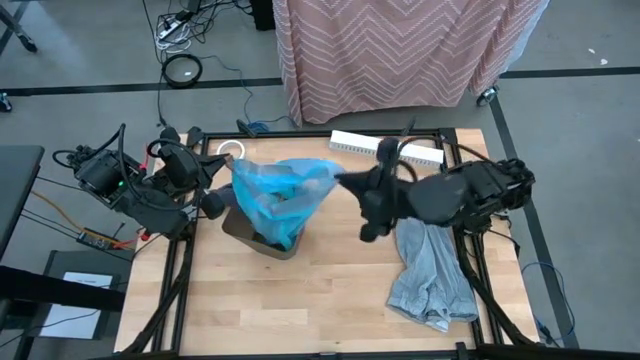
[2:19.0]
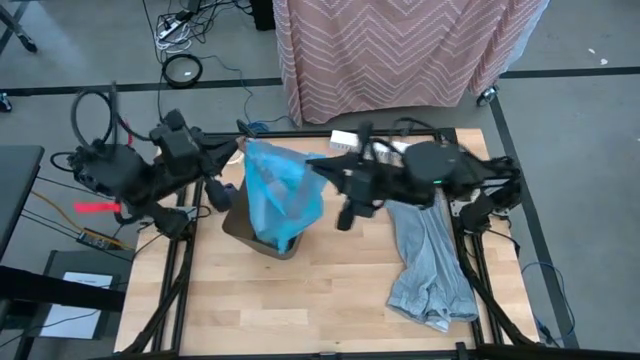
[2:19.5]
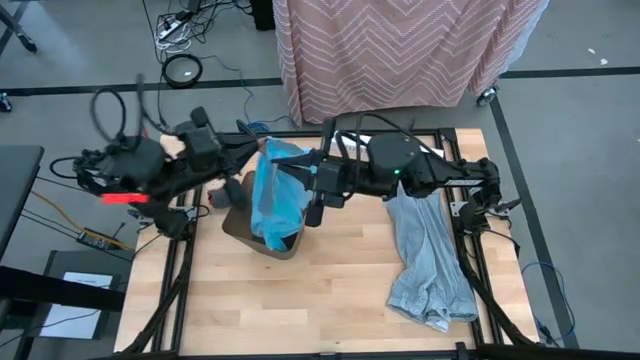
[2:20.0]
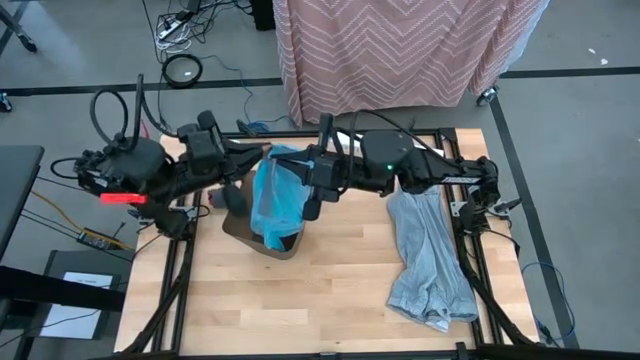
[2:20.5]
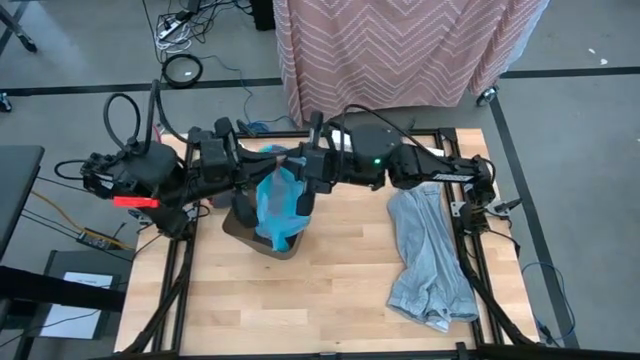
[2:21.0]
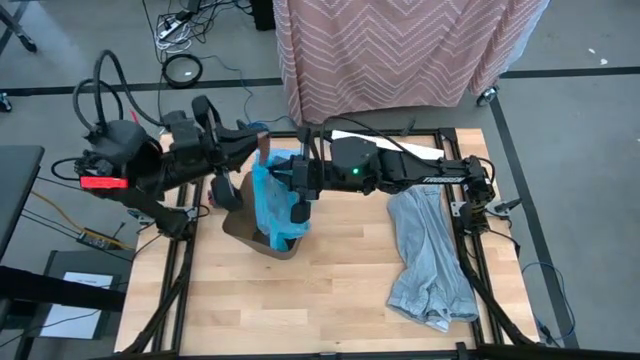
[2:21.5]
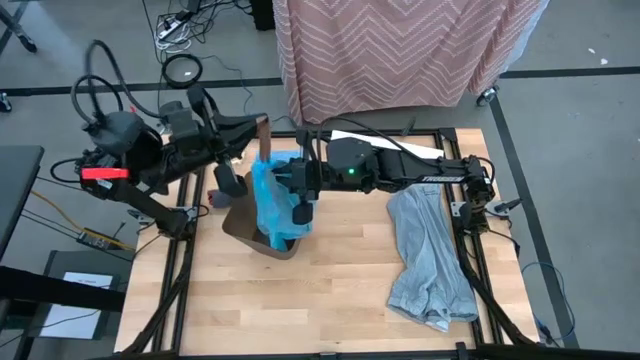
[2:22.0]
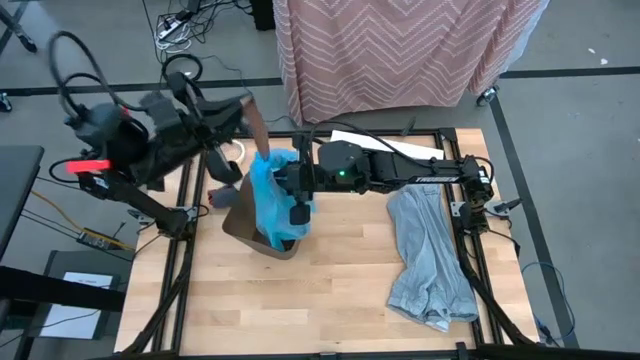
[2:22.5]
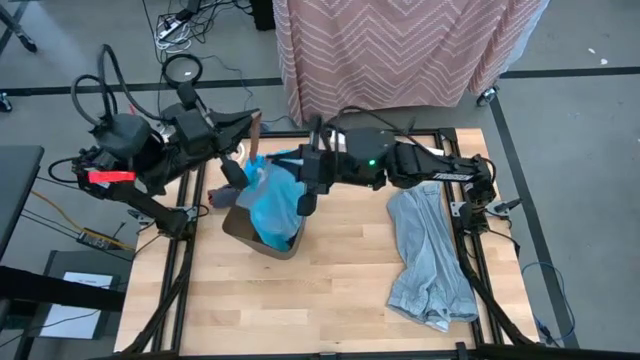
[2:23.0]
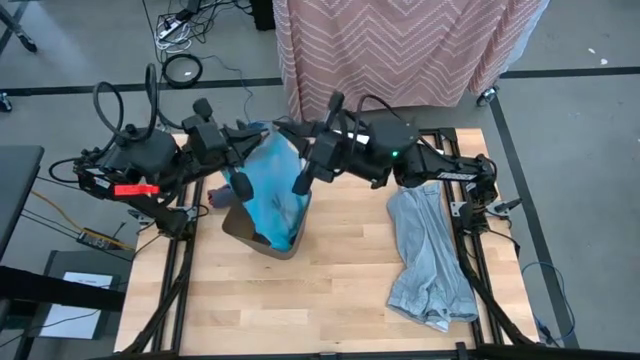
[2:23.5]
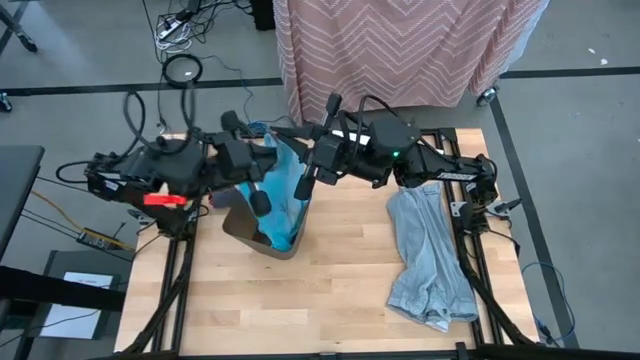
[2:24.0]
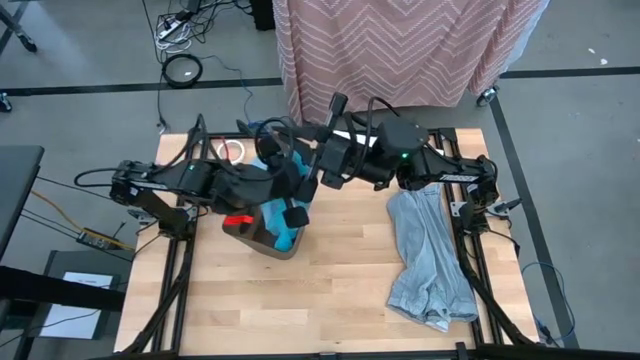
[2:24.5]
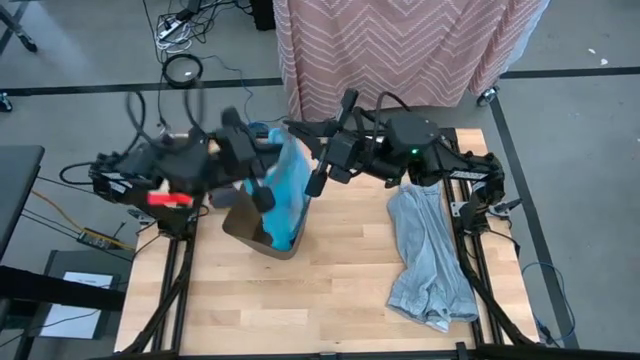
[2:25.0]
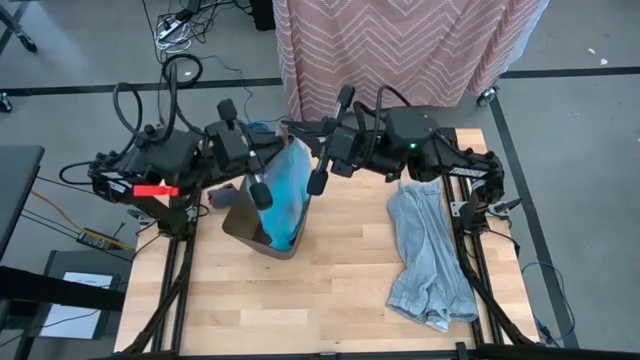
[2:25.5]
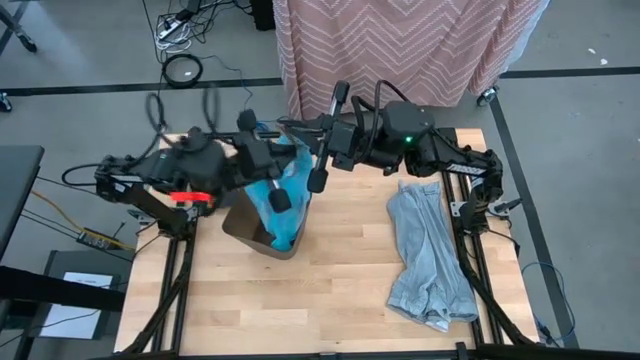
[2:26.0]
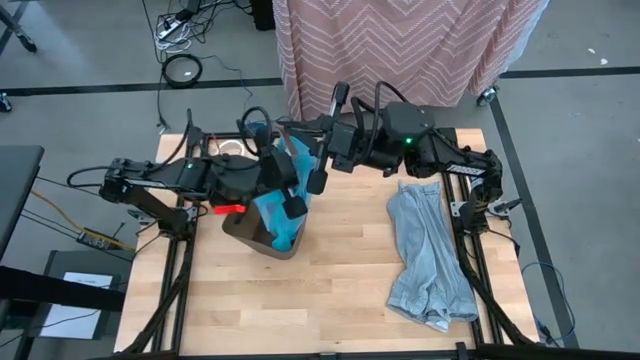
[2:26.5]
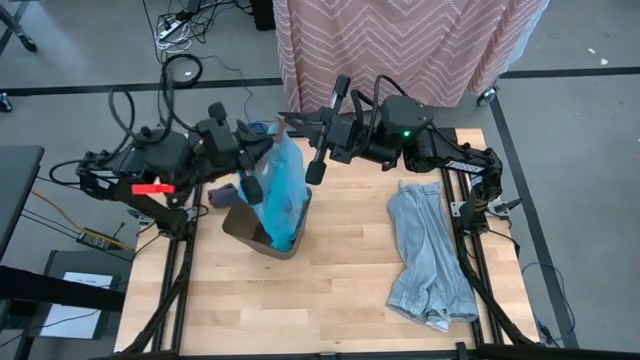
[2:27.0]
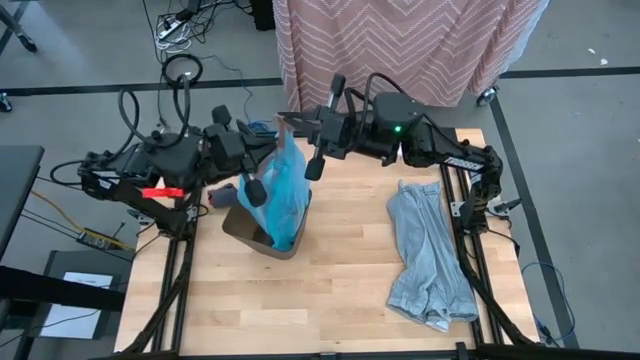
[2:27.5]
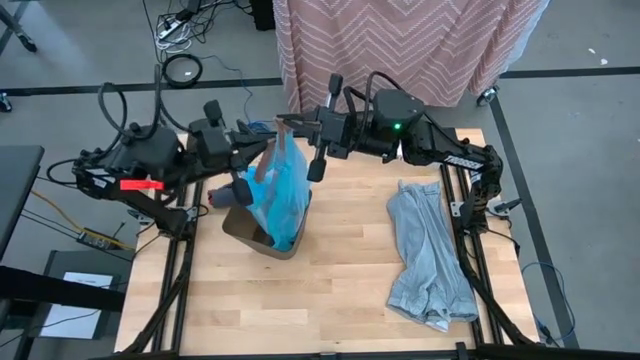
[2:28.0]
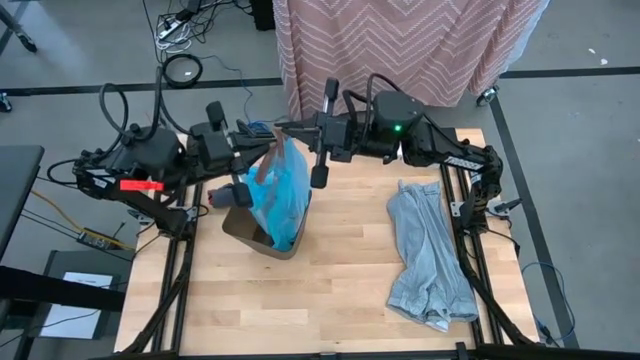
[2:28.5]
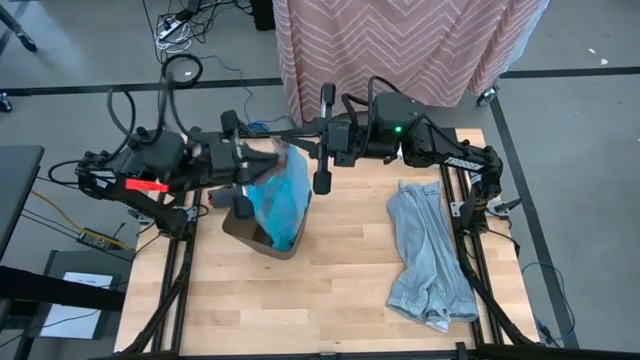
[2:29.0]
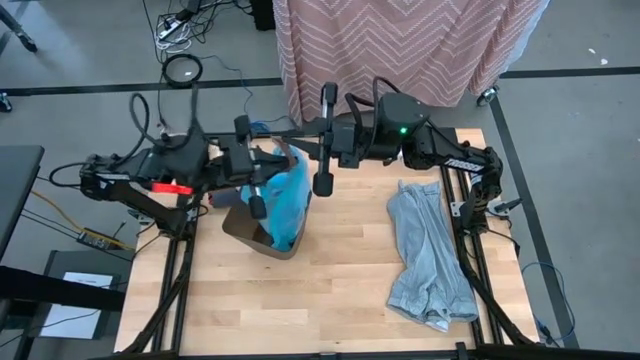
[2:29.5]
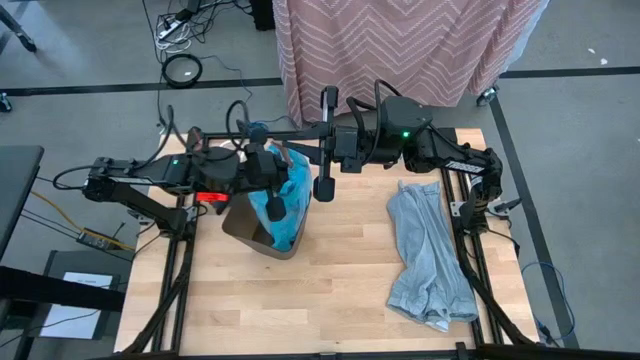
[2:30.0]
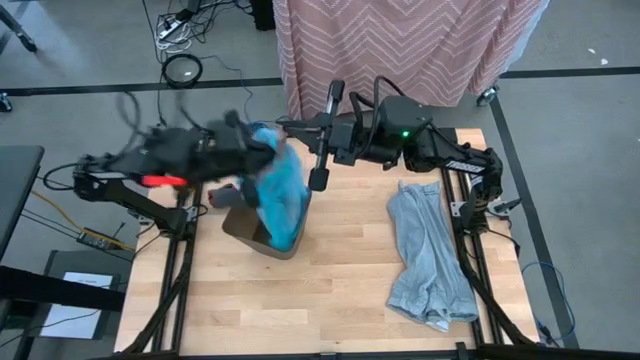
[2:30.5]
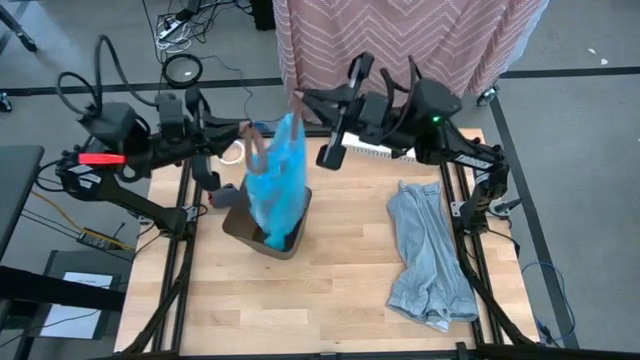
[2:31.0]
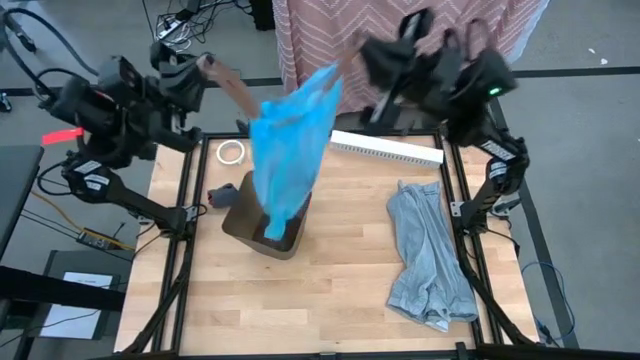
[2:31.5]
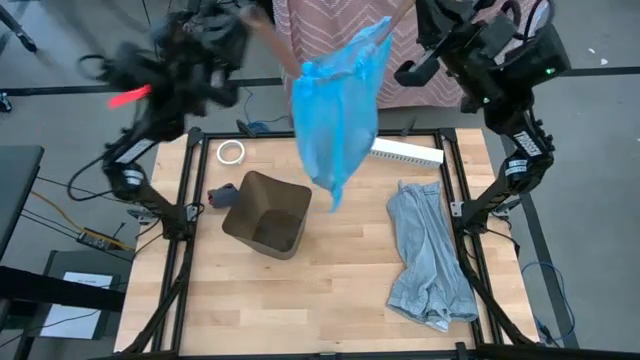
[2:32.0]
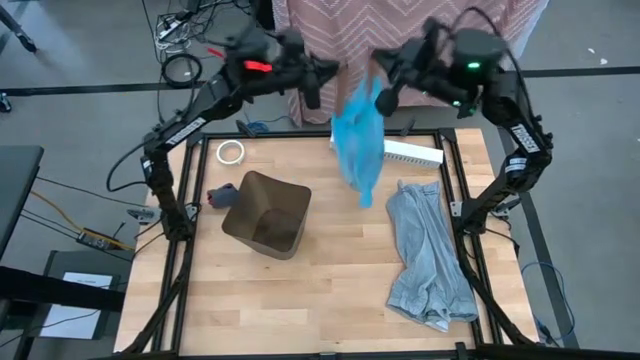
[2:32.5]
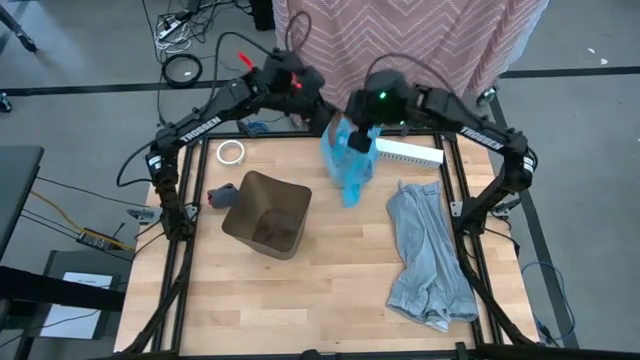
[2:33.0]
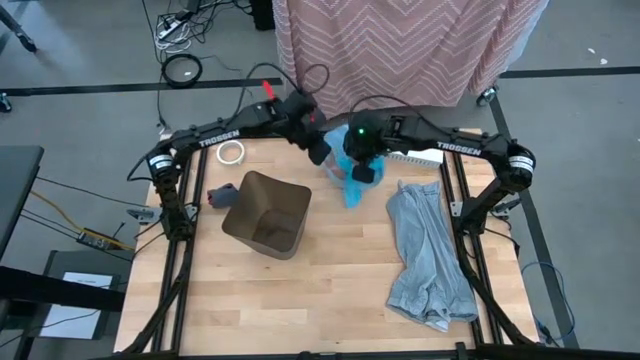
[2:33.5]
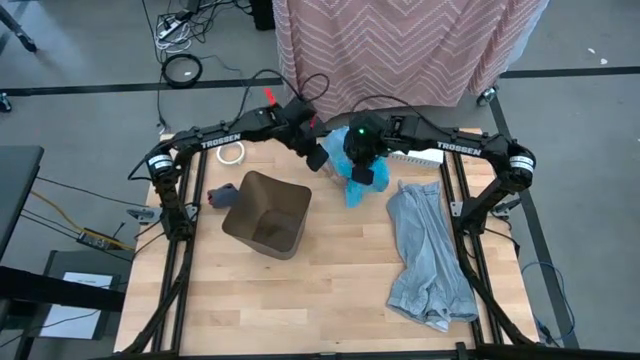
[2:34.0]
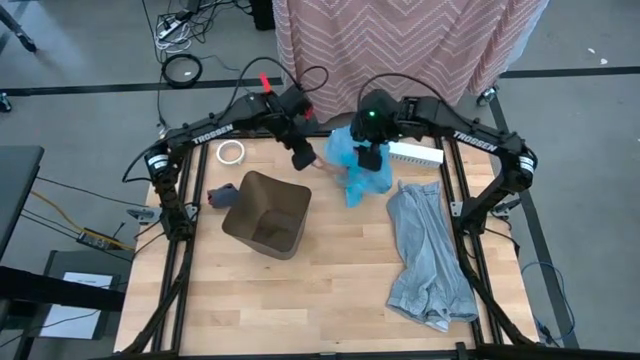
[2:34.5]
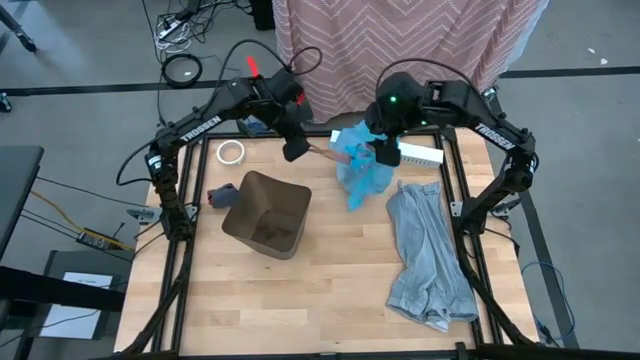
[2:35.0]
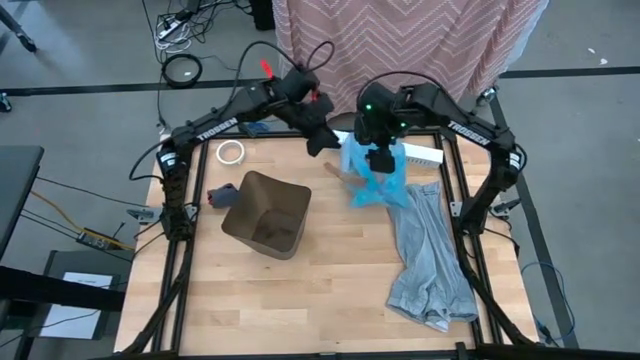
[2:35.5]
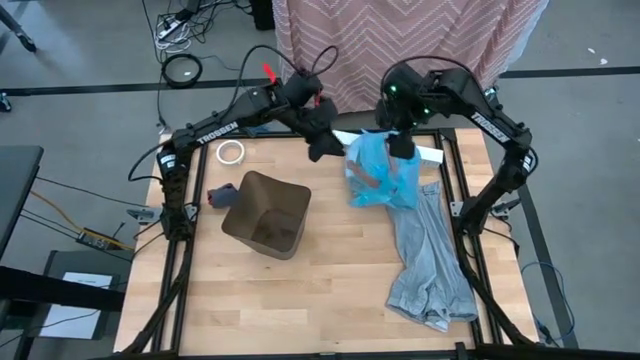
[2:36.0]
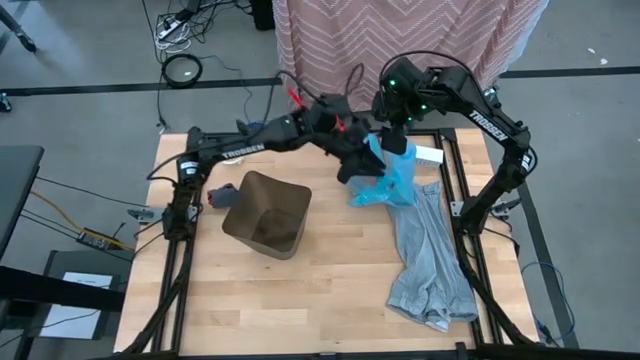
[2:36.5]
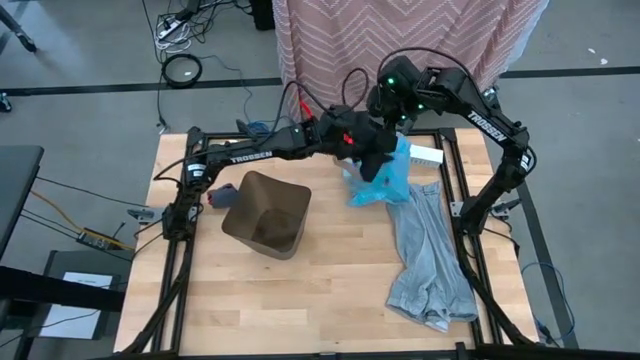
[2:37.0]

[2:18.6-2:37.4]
Task: place trash/remove bag and relplace
Remove the blue trash bag from the black trash bin

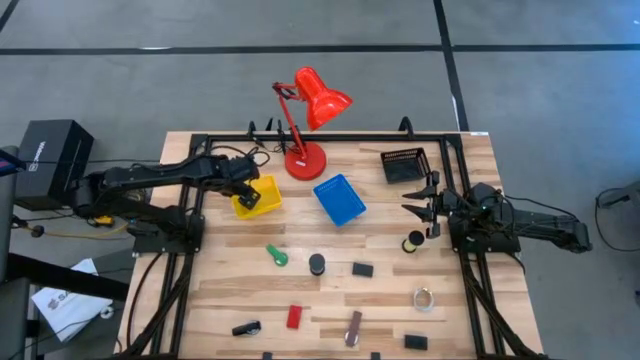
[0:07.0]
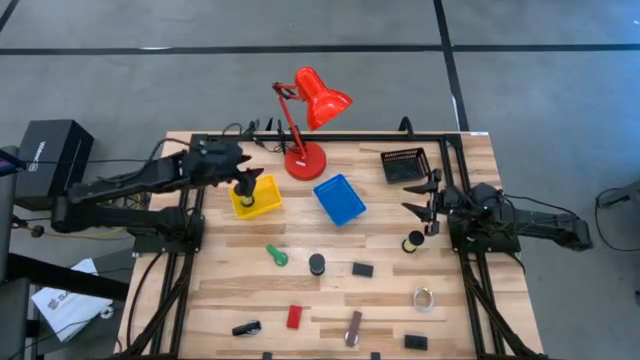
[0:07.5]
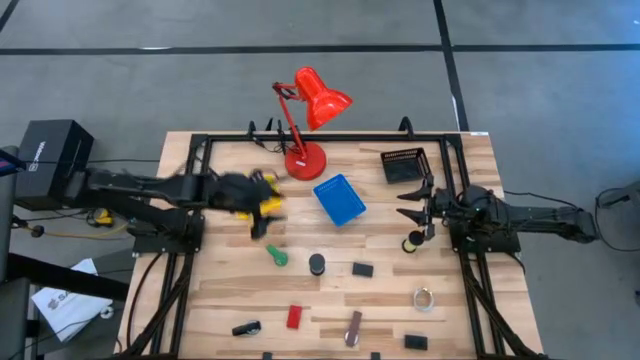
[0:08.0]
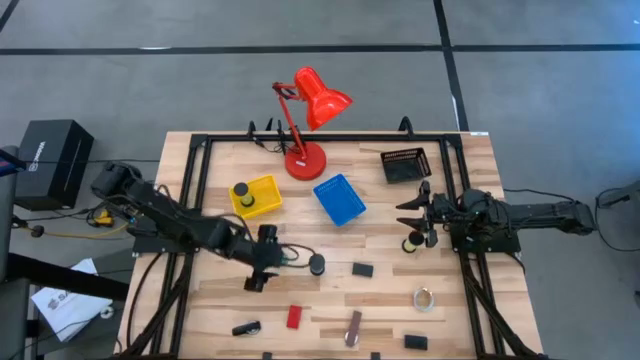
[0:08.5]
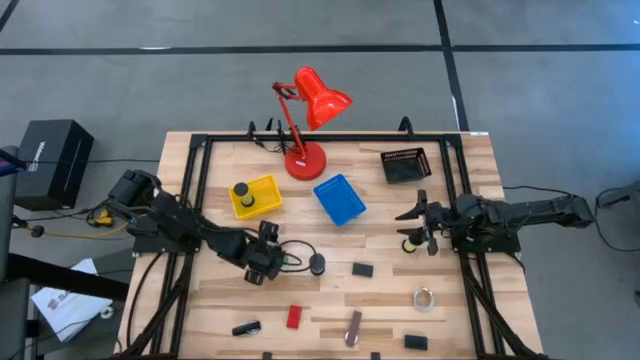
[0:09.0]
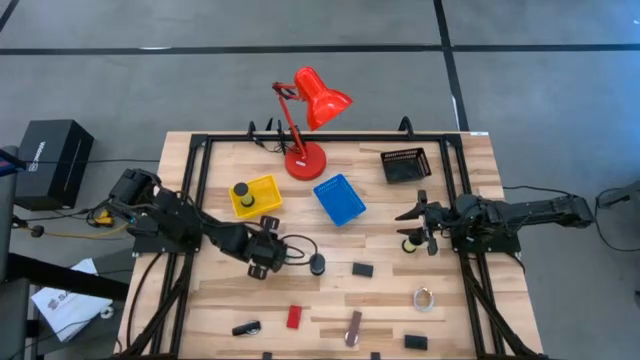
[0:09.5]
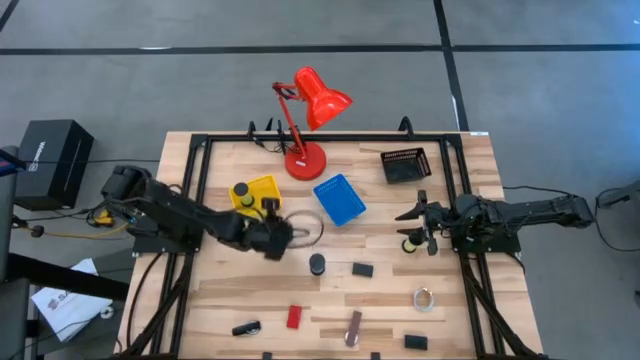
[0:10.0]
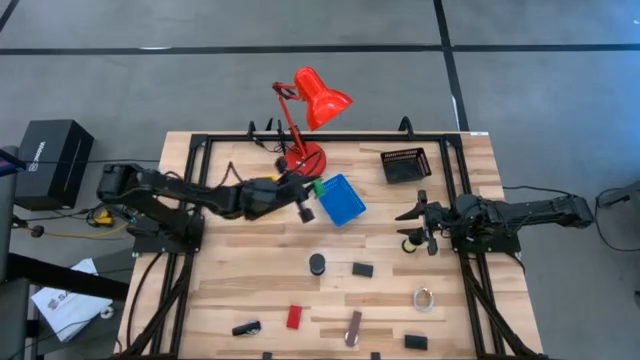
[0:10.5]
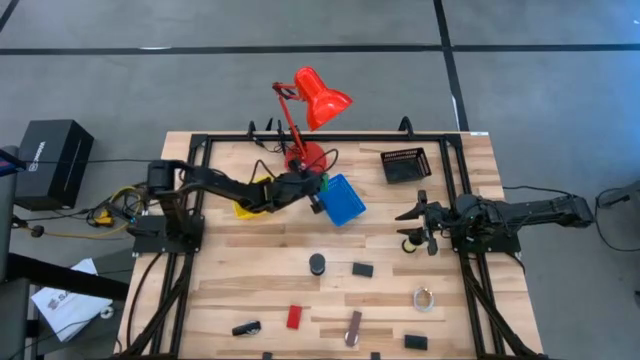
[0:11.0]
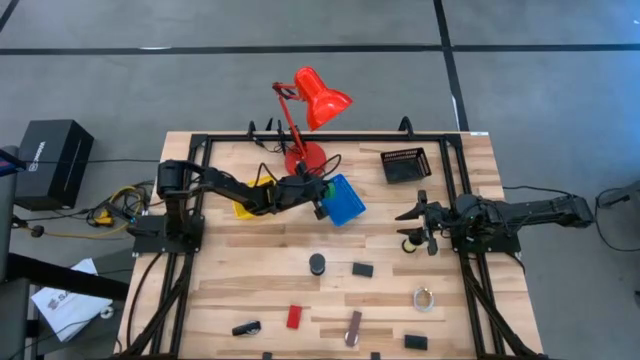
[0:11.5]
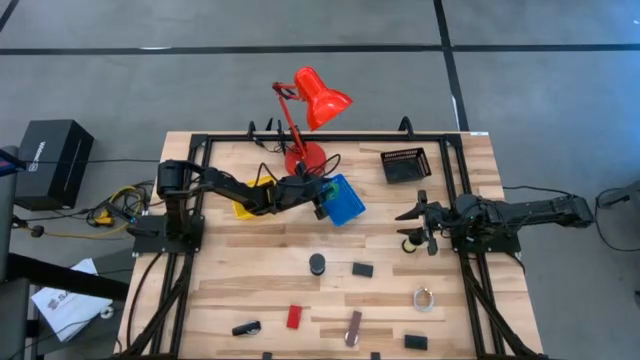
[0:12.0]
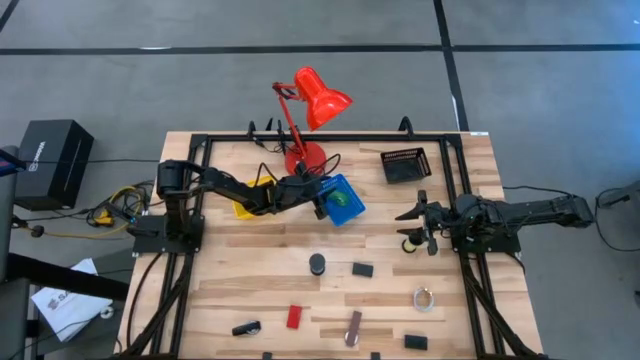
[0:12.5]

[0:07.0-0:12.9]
Task: Pick & Place Office items
Put the green wristwatch into the blue bin
